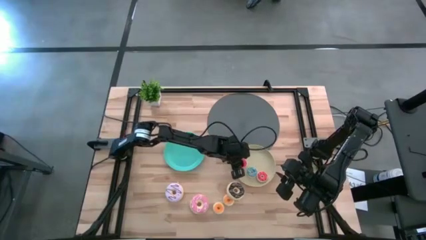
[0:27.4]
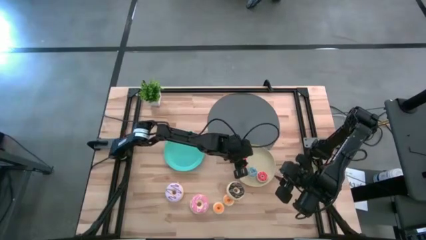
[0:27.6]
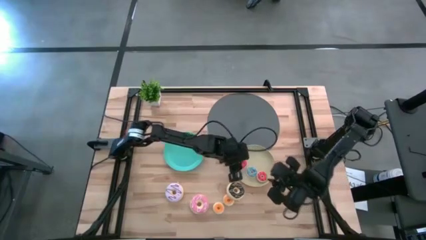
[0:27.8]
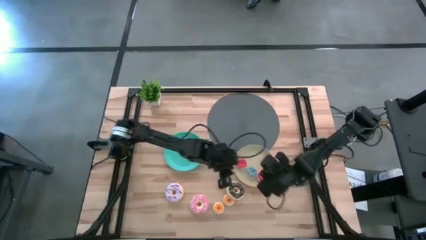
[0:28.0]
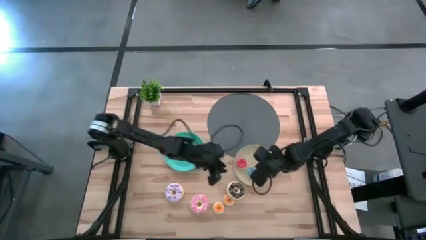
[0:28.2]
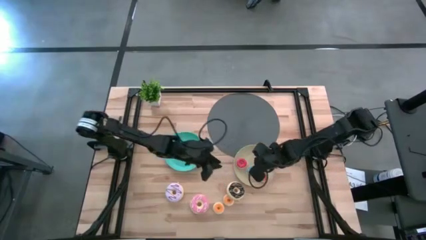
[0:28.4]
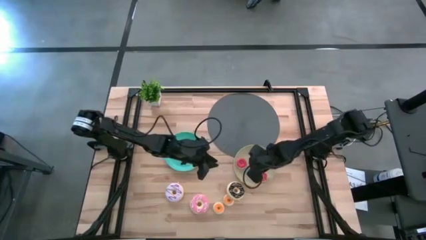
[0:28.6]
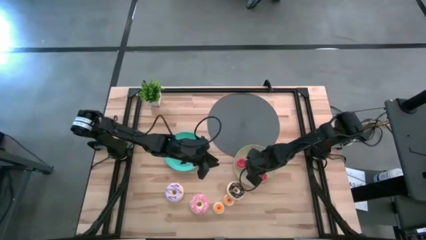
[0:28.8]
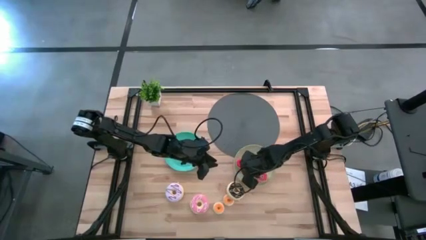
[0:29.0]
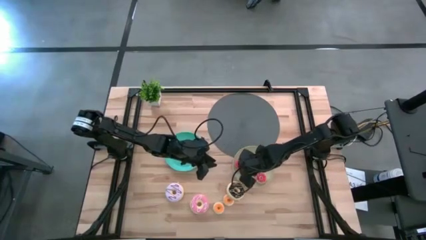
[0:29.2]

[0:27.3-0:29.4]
Task: Pick & Place donuts
Adjust the small blue doughnut to align with the red doughnut on the brown plate

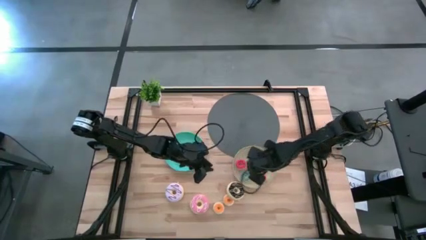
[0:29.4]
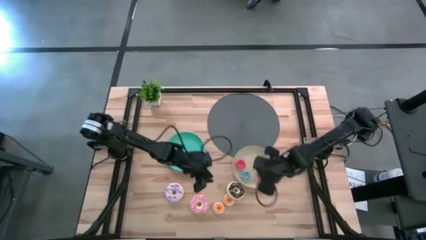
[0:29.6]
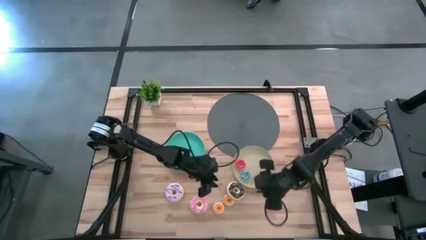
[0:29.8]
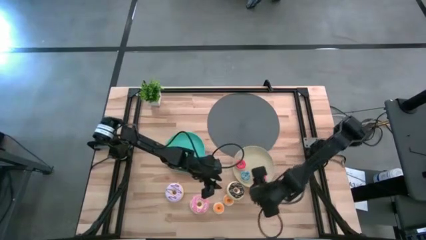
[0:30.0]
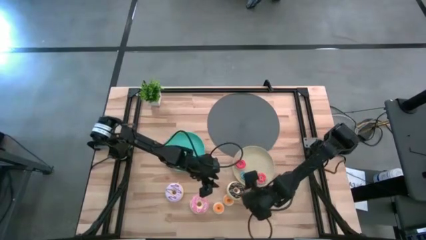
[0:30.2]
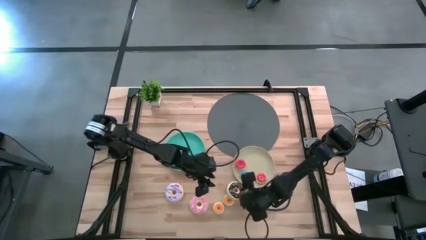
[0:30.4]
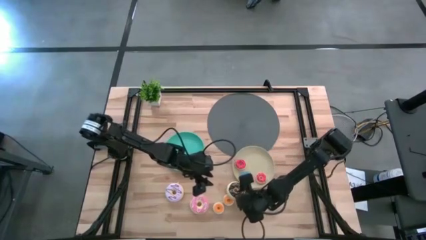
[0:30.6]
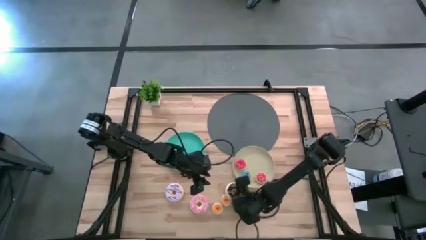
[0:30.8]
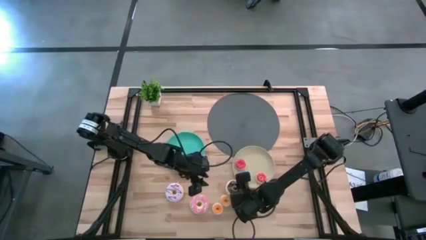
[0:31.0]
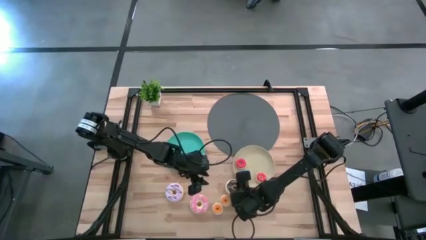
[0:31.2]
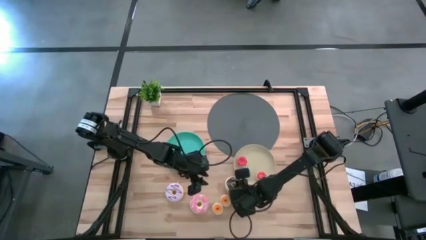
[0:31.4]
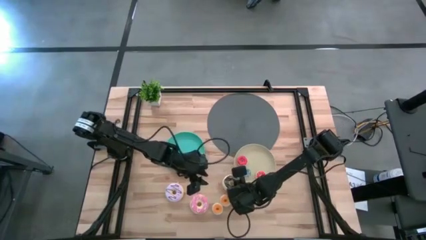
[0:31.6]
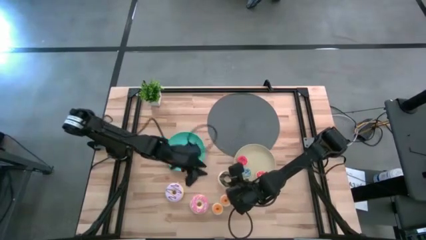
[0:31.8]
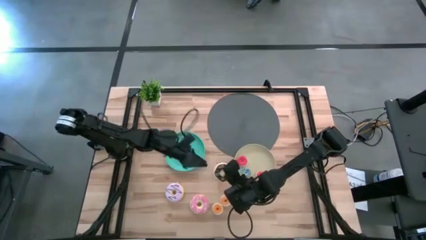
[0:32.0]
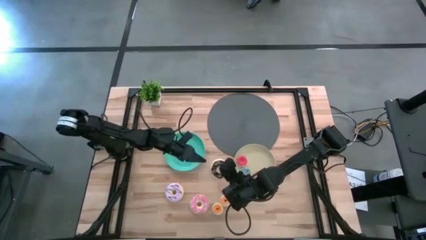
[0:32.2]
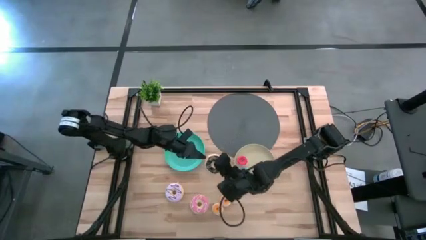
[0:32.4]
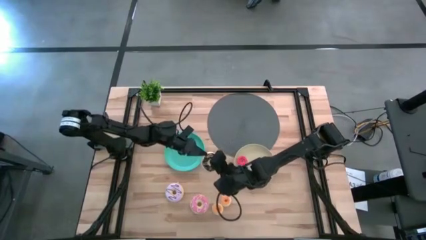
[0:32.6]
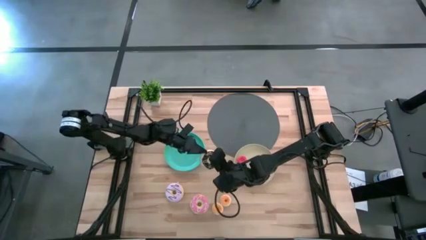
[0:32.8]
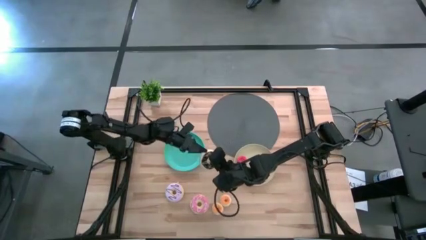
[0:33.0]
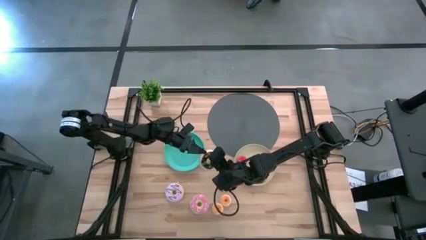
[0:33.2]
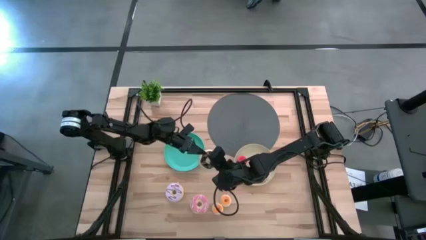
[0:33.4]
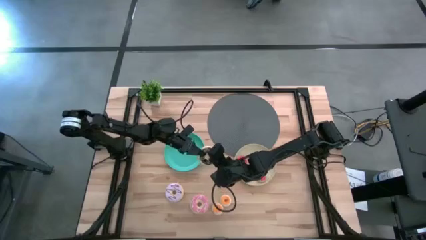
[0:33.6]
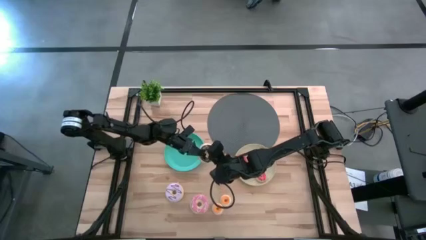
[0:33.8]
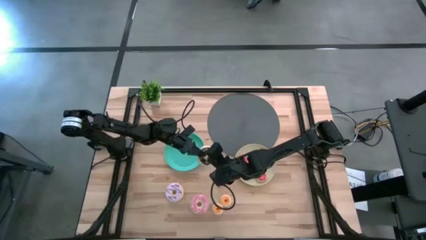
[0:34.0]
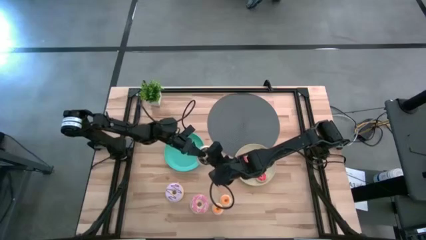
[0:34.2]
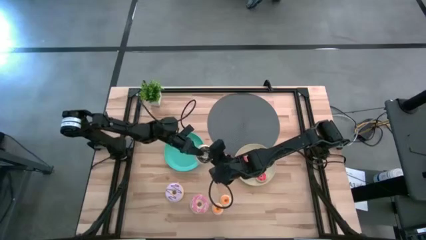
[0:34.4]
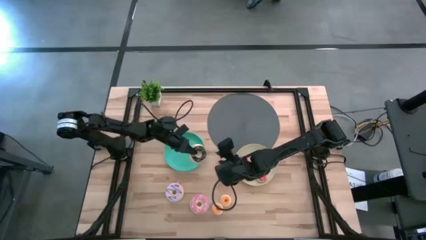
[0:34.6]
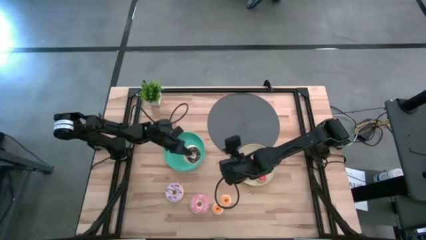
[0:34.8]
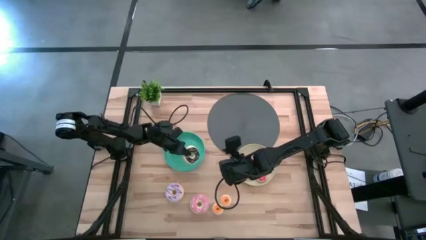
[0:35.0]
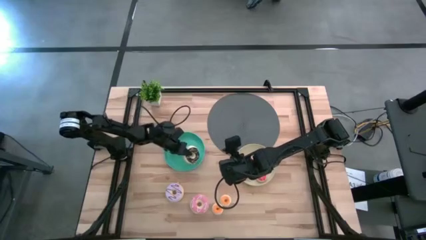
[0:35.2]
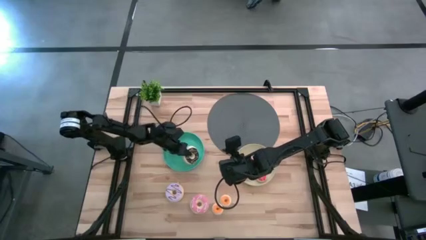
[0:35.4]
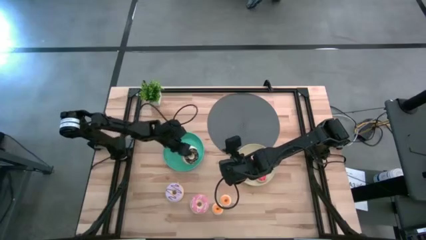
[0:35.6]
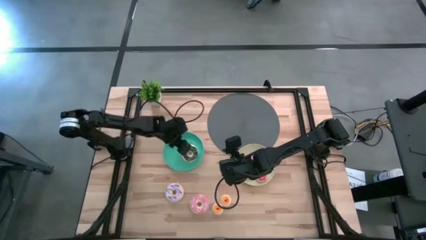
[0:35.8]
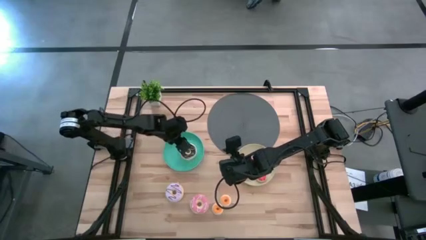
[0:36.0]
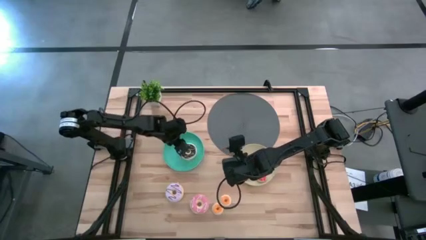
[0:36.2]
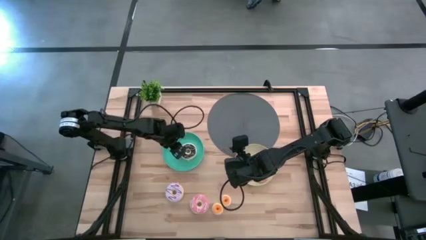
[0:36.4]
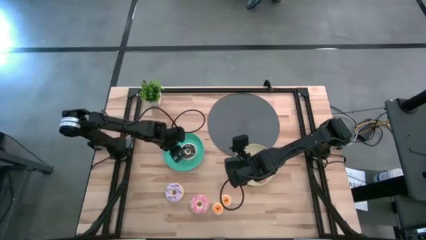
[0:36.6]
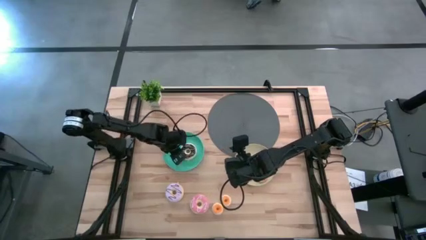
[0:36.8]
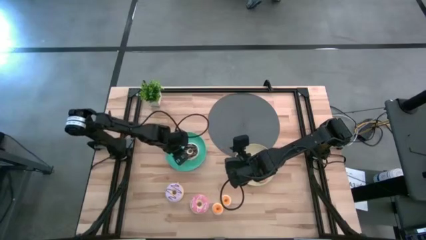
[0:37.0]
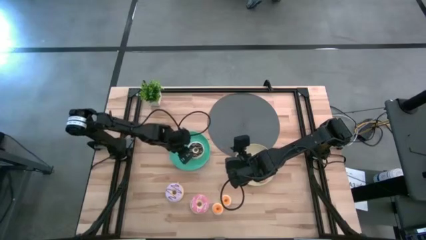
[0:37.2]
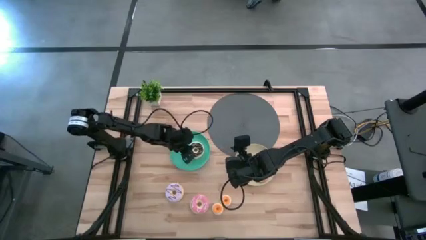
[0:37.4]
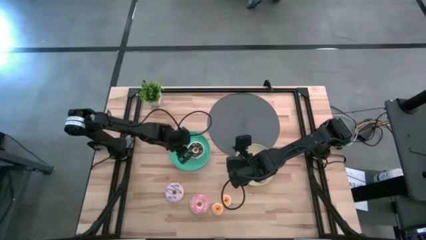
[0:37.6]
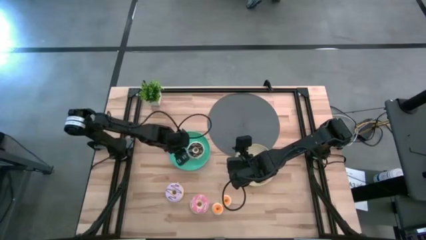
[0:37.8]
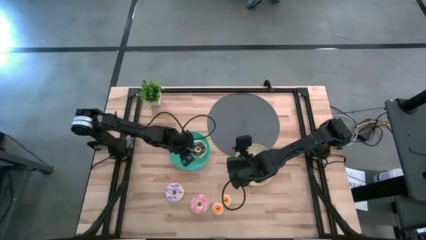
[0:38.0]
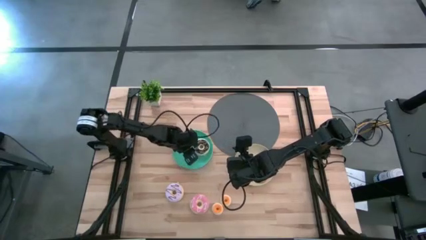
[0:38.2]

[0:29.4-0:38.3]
Put the big black doughnut on the blue plate

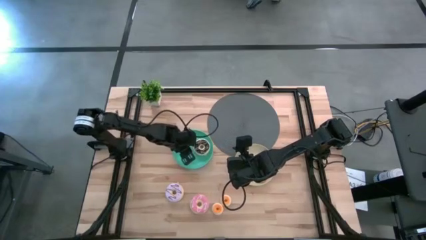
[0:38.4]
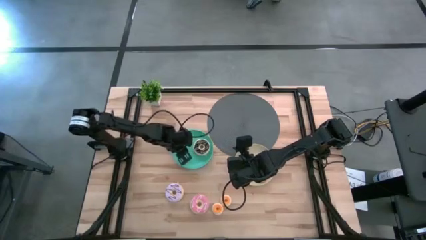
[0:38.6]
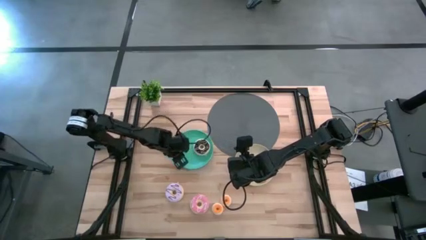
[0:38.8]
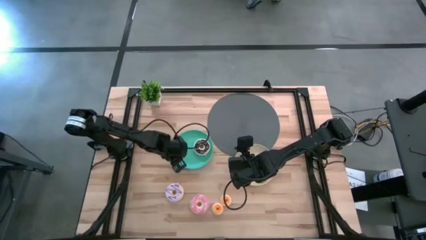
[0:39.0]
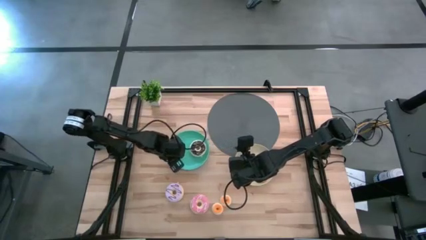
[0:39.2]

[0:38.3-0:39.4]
Adjust the blue plate to the left of the table

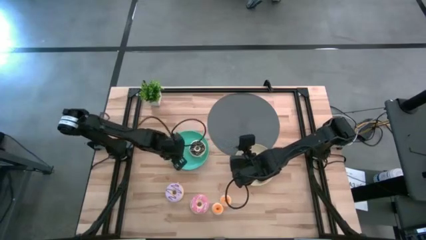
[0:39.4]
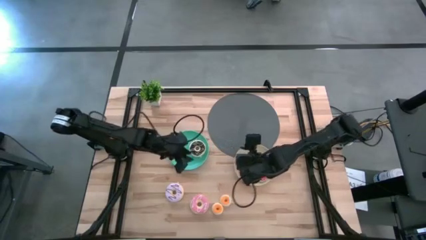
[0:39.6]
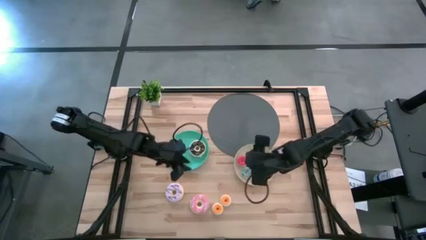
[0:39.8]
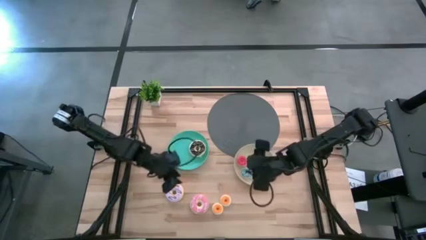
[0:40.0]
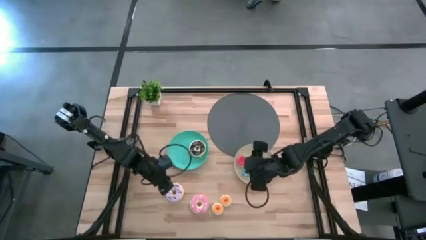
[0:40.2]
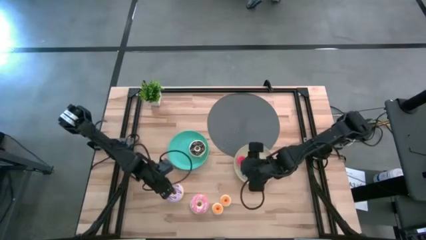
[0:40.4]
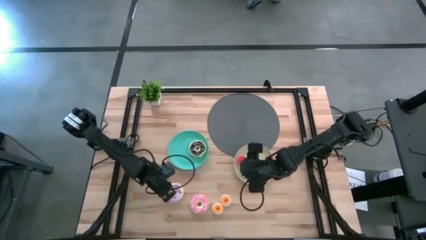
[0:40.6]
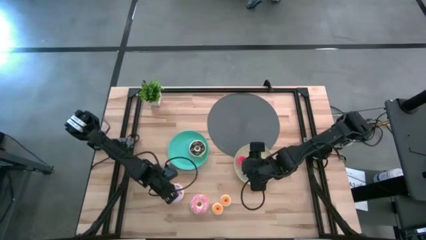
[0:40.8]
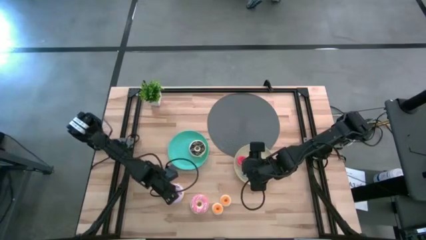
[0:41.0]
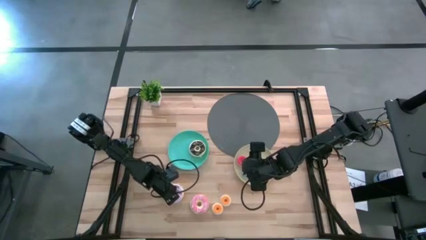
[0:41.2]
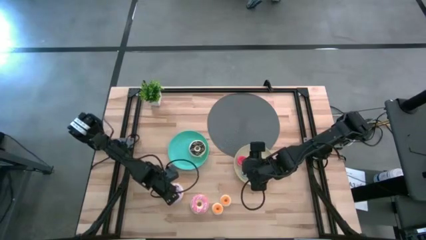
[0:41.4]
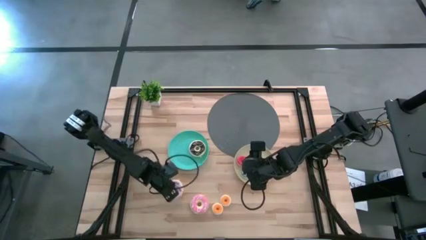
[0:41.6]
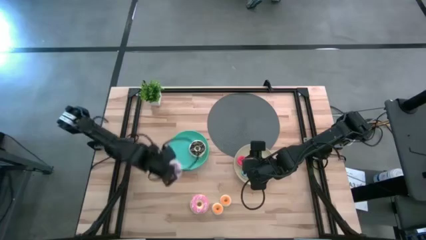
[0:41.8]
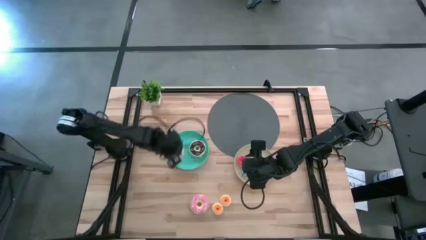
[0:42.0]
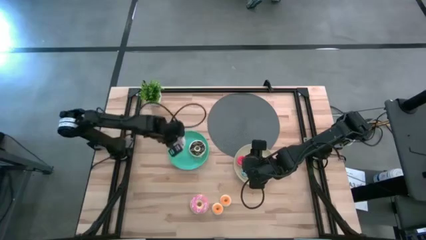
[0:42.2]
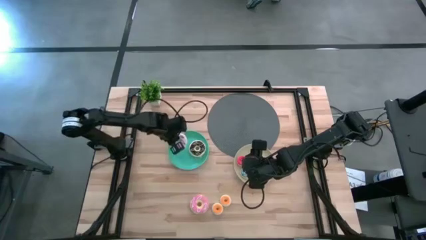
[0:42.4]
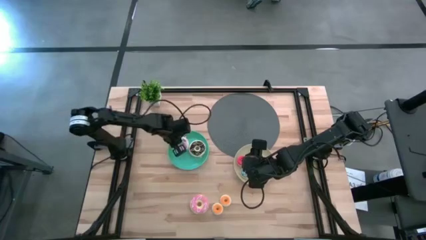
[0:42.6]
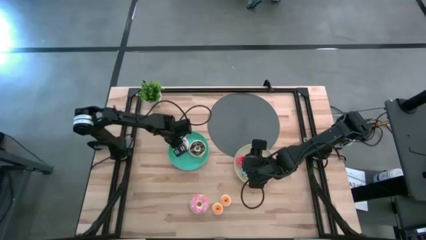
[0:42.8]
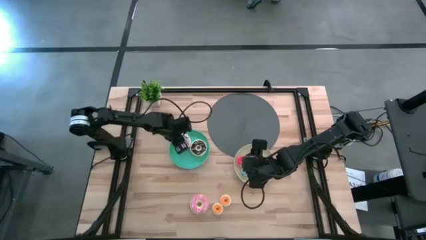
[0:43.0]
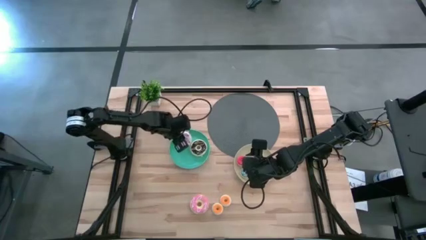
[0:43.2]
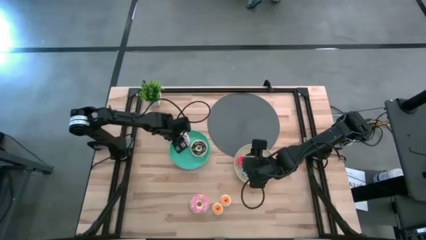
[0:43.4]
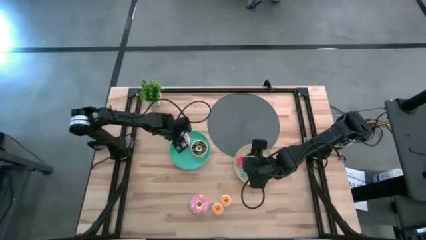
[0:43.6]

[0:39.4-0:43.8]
Put the big purple doughnut on the blue plate
